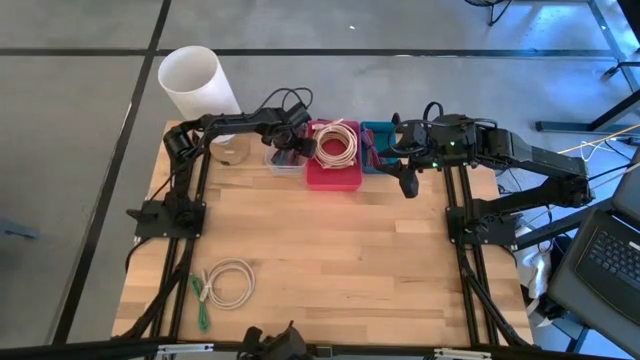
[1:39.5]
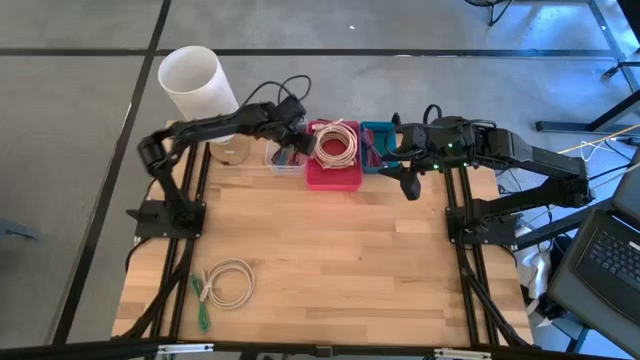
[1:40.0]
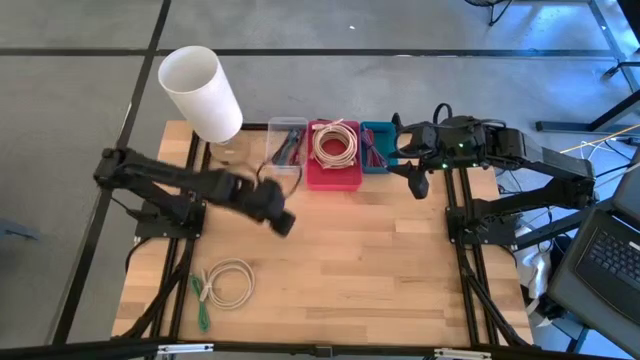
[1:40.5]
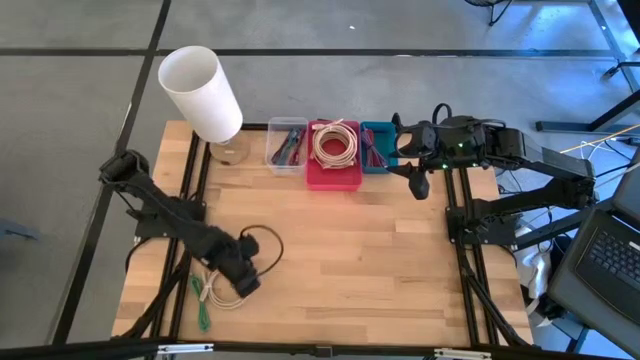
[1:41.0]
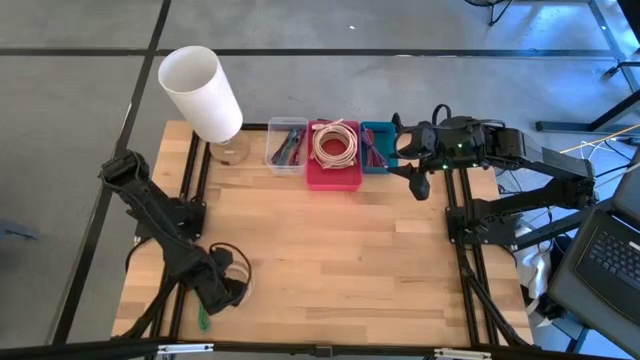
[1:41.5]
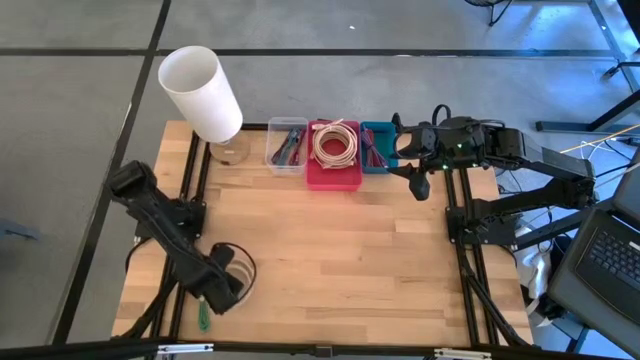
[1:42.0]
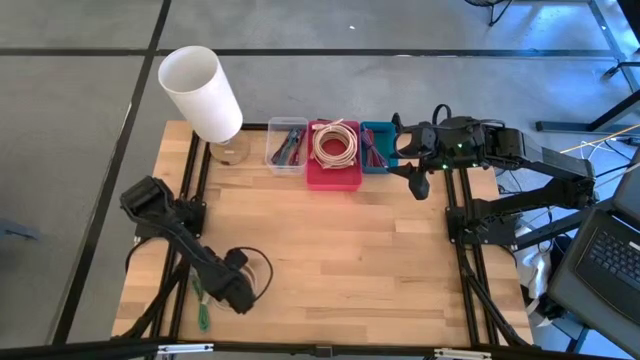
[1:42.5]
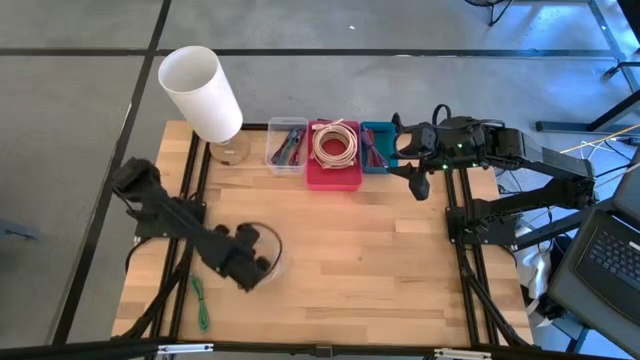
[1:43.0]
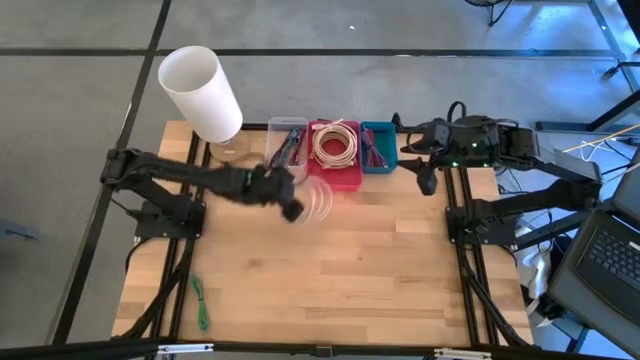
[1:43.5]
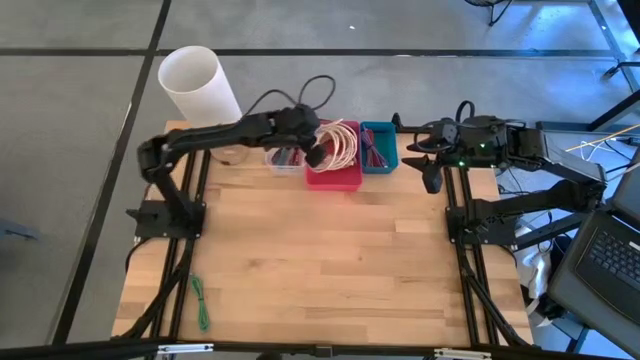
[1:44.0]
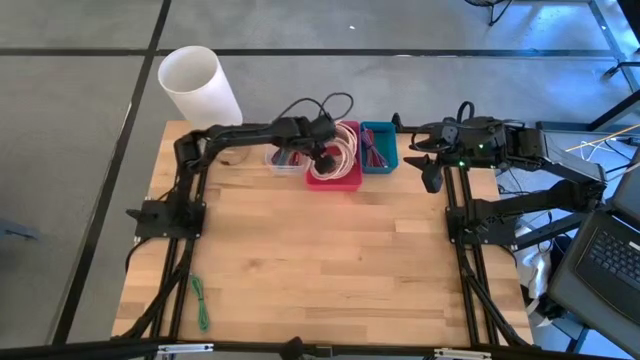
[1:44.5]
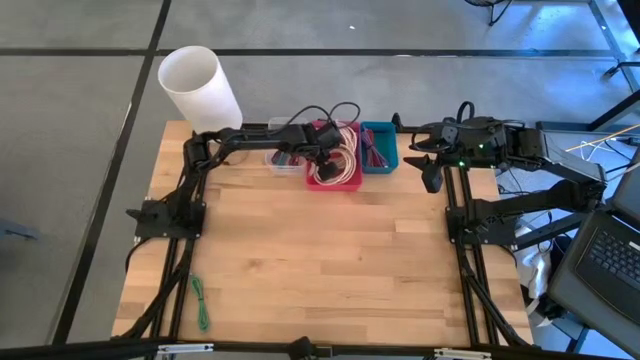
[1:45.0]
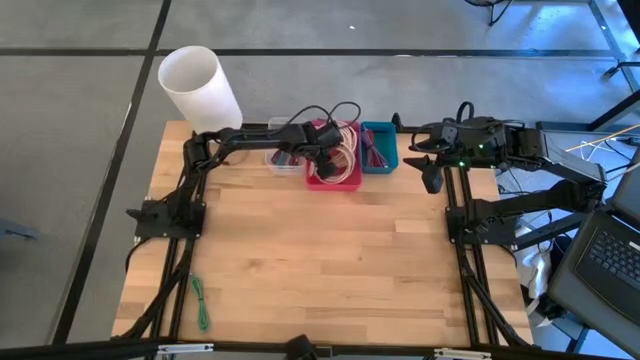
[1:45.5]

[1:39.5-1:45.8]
Task: Pick & Place USB Port
Put the brown HDMI cable into the red bin

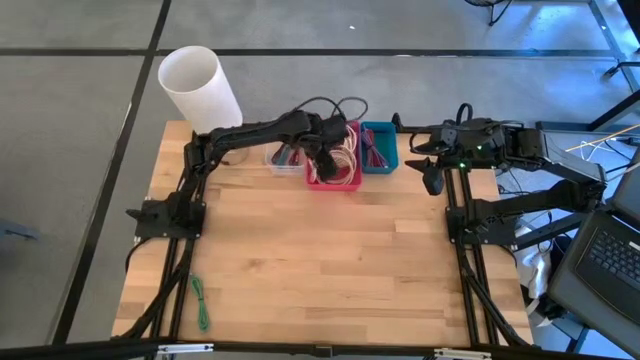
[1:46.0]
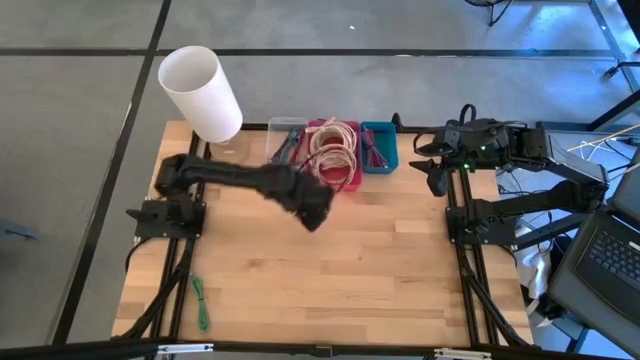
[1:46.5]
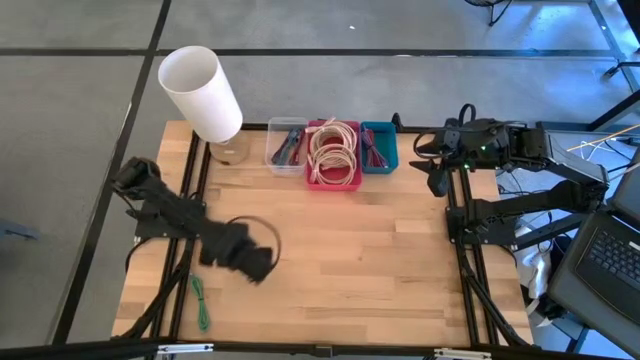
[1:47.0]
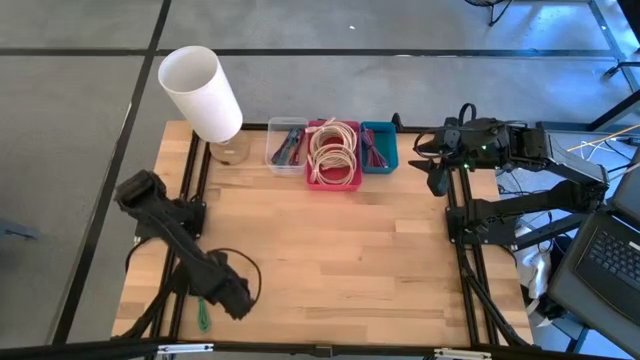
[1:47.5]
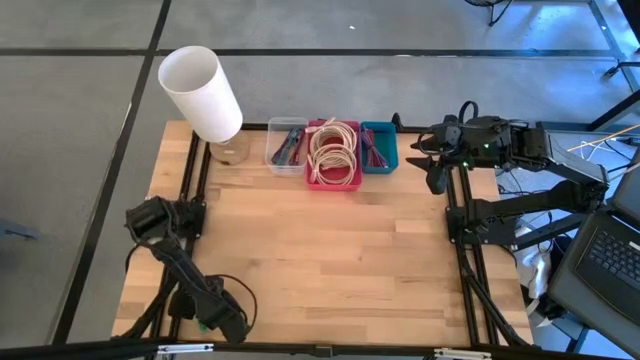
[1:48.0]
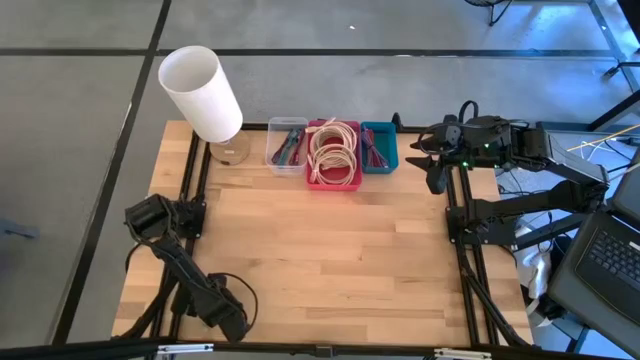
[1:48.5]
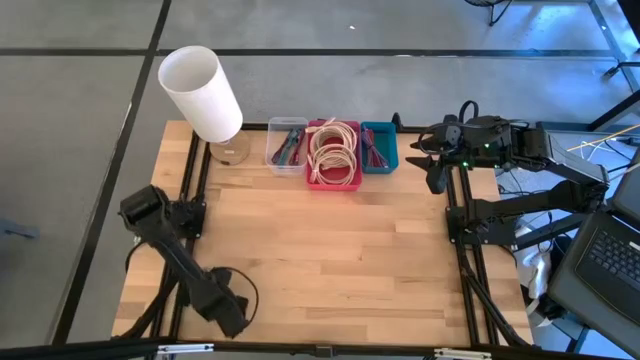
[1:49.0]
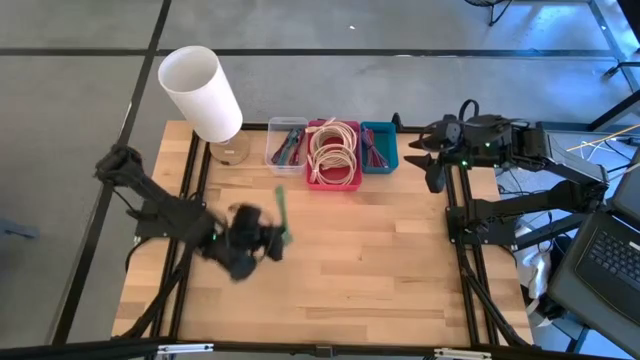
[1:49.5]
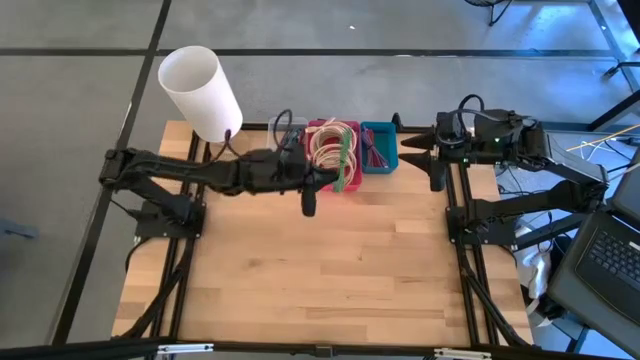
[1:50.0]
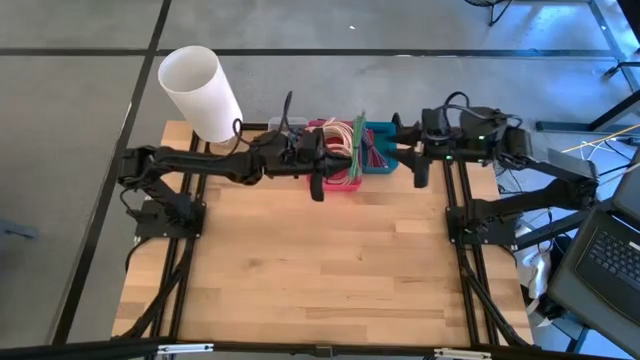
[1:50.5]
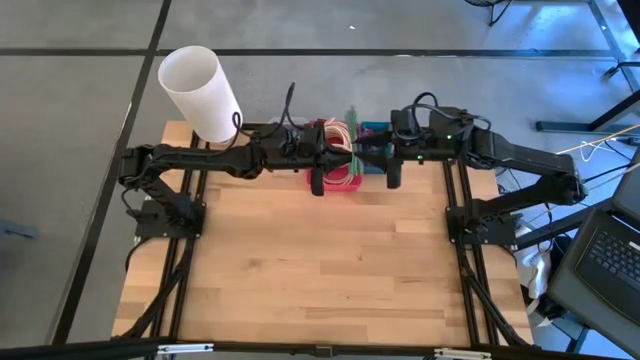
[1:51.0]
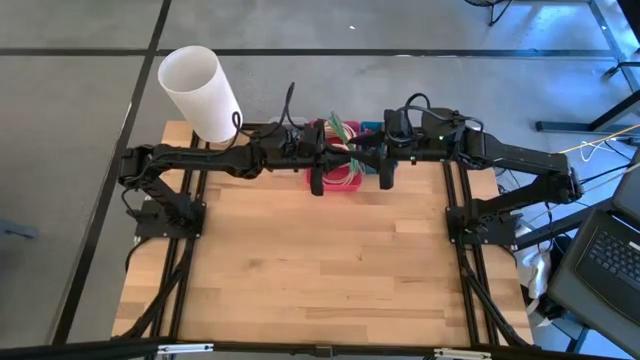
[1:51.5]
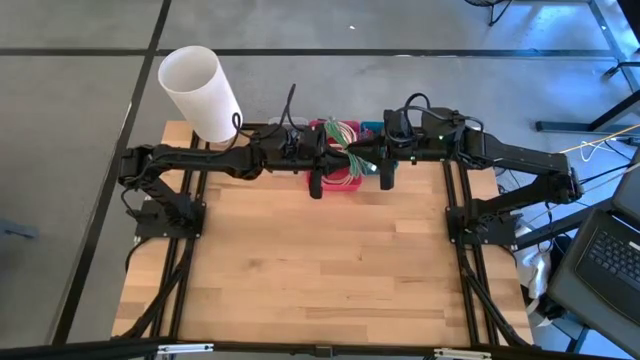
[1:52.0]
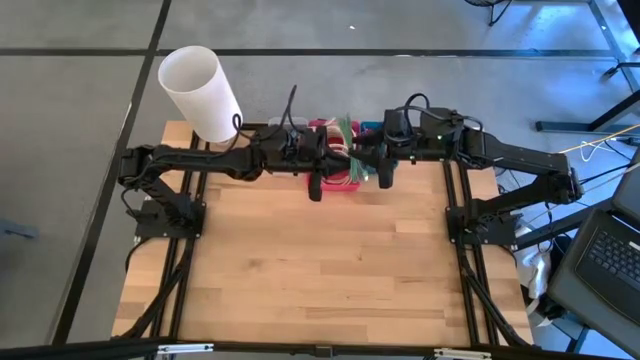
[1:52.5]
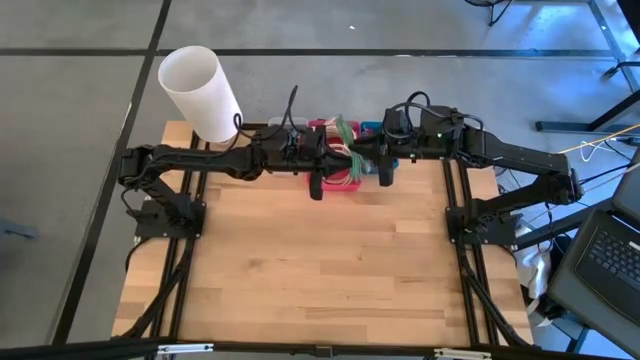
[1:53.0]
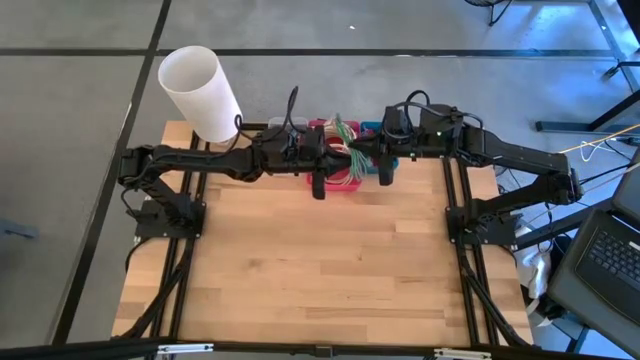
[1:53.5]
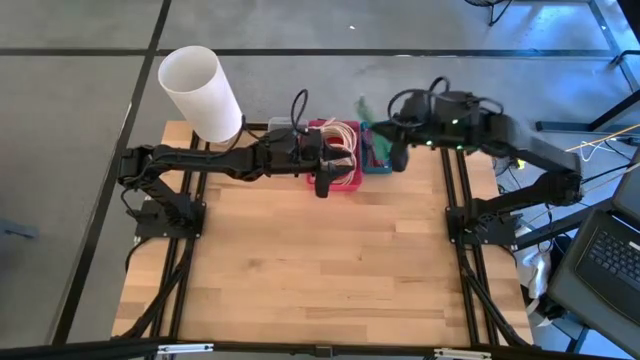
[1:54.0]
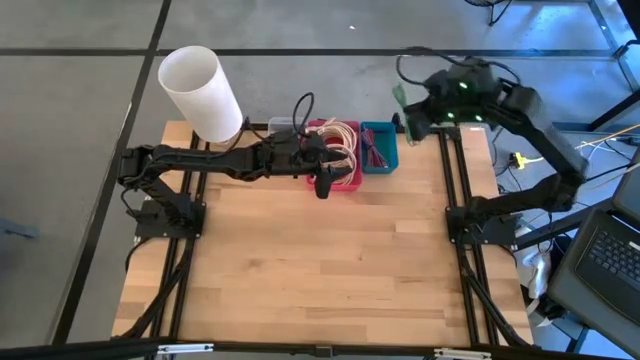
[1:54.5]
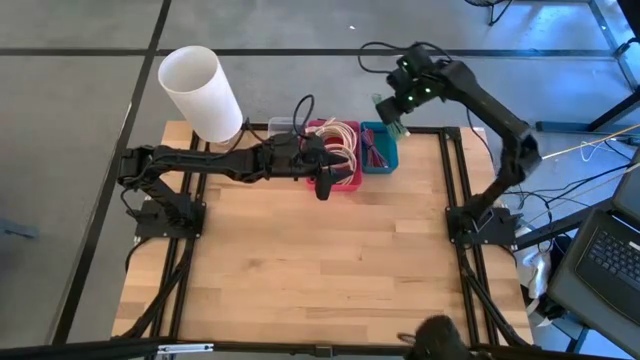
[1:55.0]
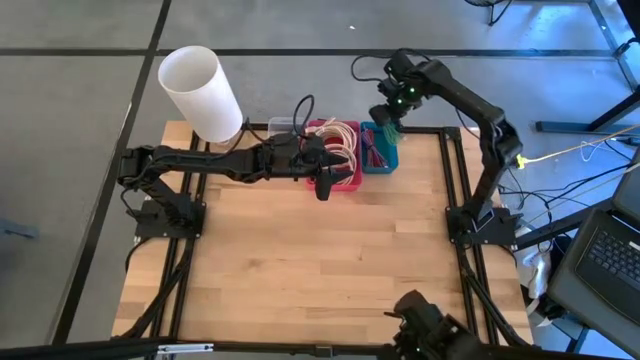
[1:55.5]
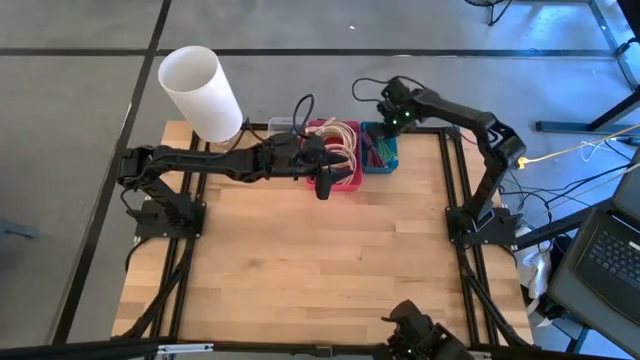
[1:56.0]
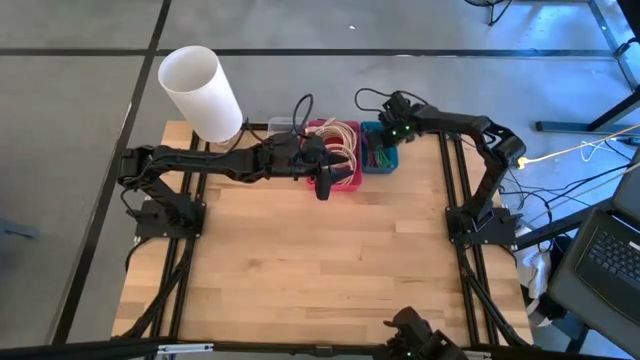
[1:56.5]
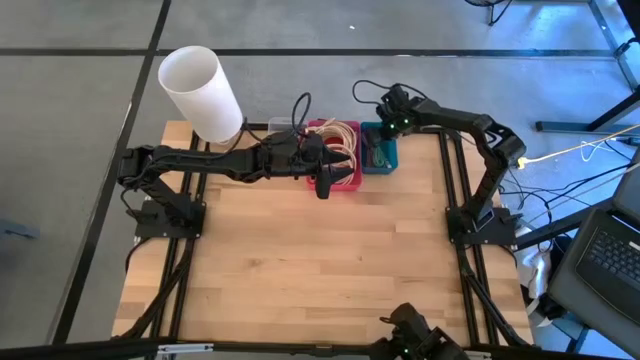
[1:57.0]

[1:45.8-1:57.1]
Put the green charger cable into the blue bin

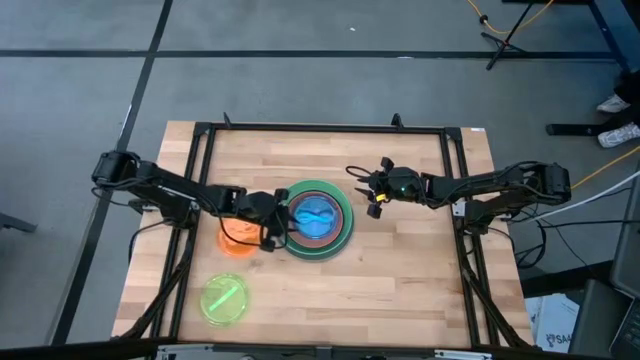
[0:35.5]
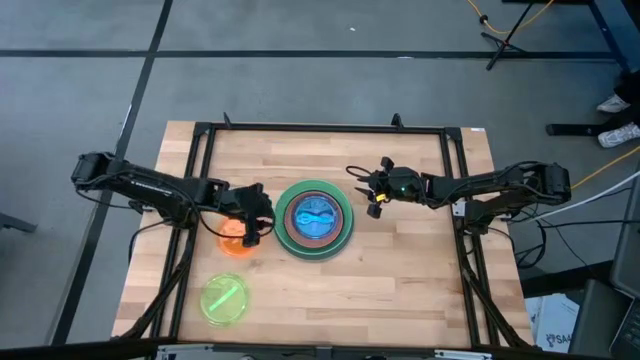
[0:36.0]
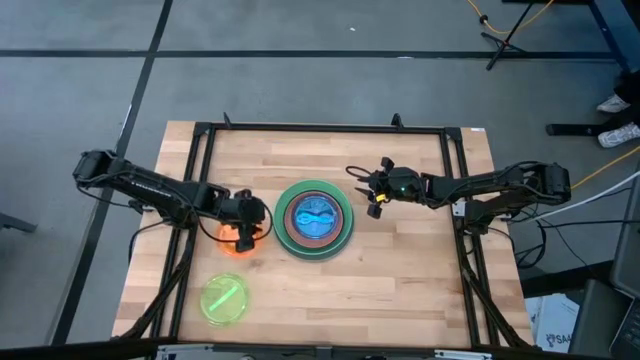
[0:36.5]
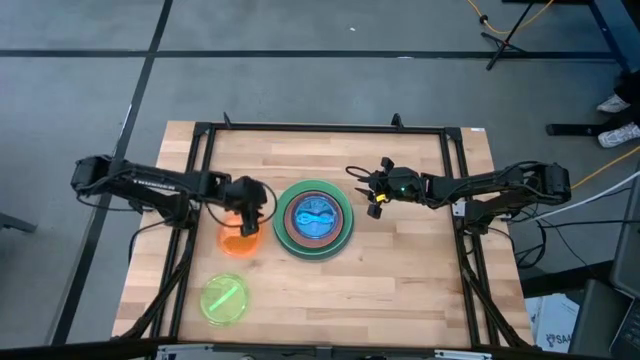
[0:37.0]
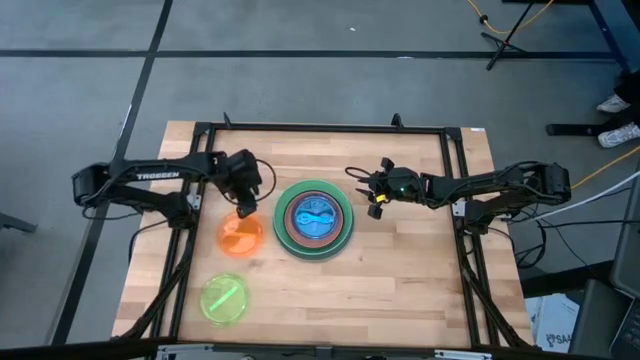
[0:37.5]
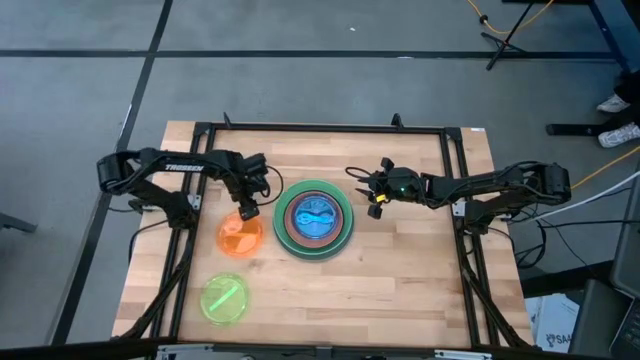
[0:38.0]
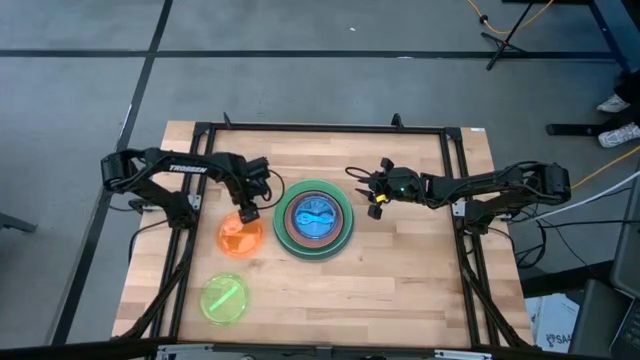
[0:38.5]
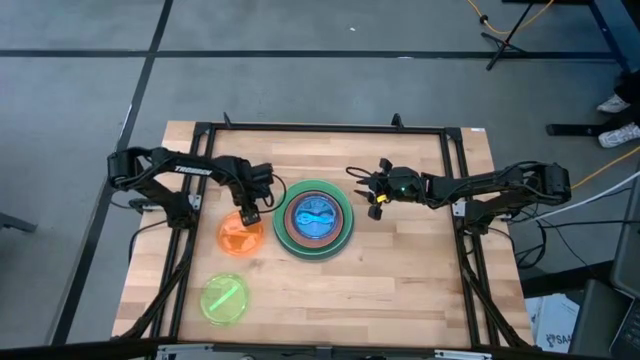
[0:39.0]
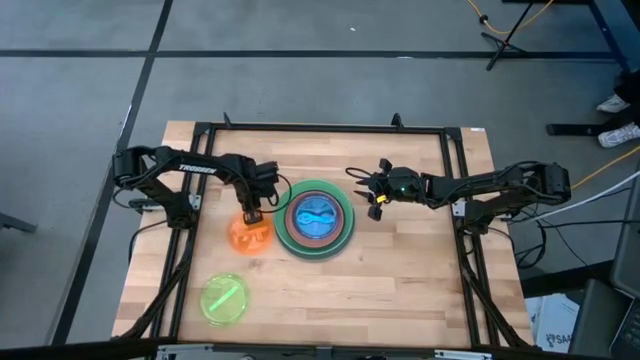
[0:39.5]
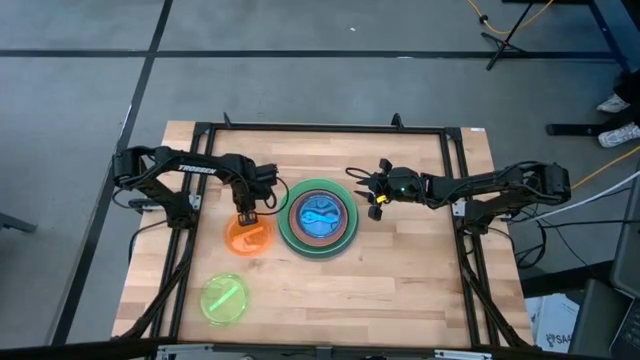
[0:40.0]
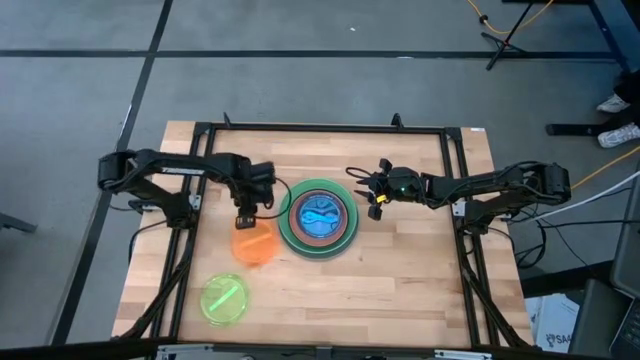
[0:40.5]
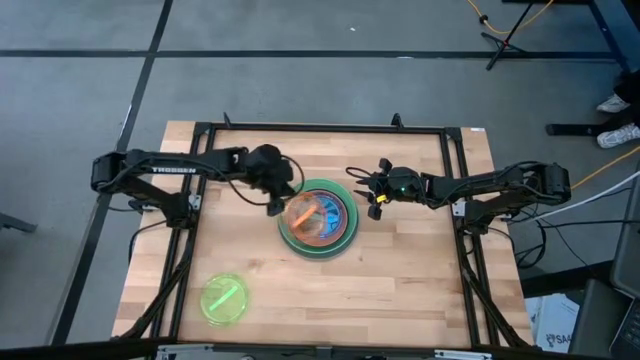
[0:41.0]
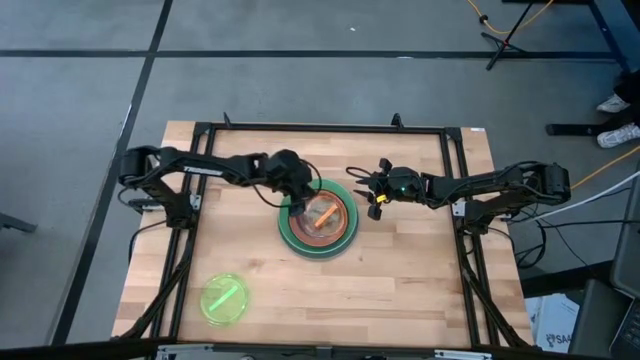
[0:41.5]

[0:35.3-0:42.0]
Task: Stack plastic plates
Stack the orange plate on top of the blue plate
